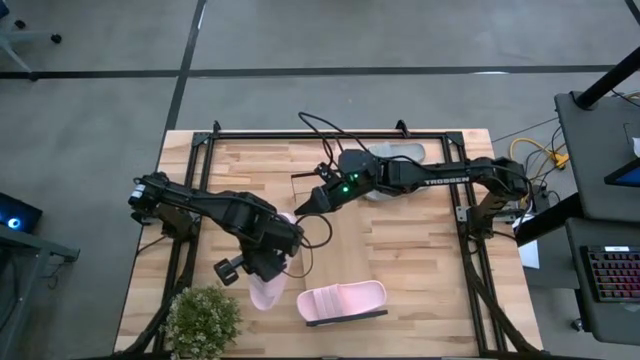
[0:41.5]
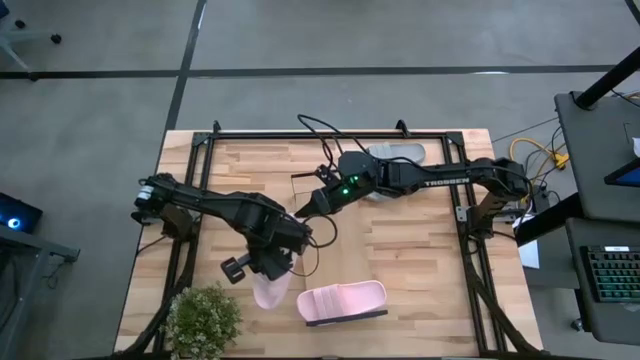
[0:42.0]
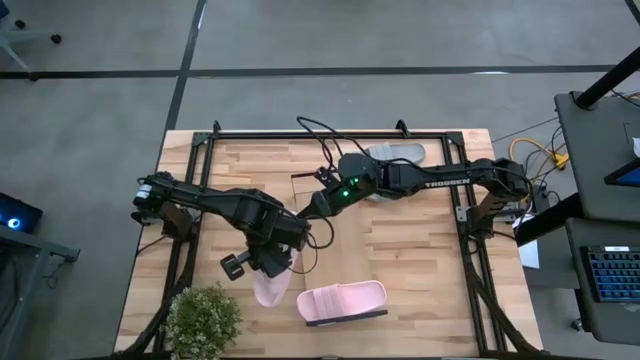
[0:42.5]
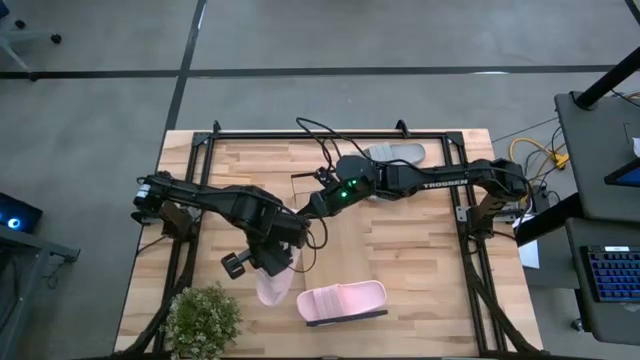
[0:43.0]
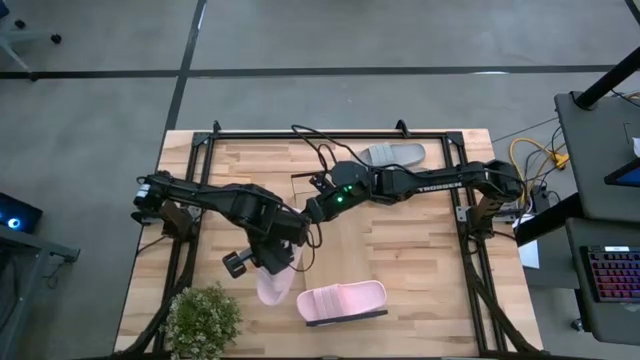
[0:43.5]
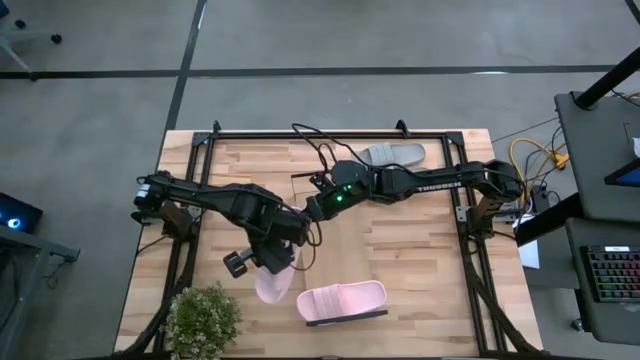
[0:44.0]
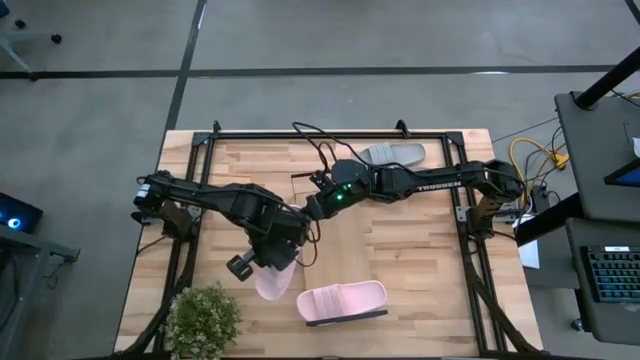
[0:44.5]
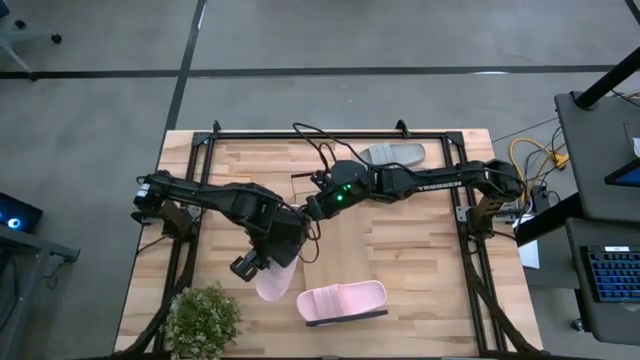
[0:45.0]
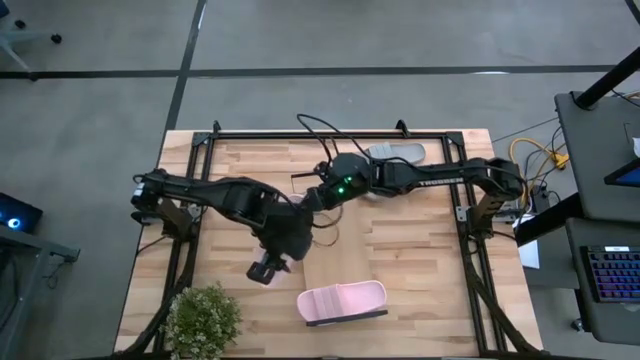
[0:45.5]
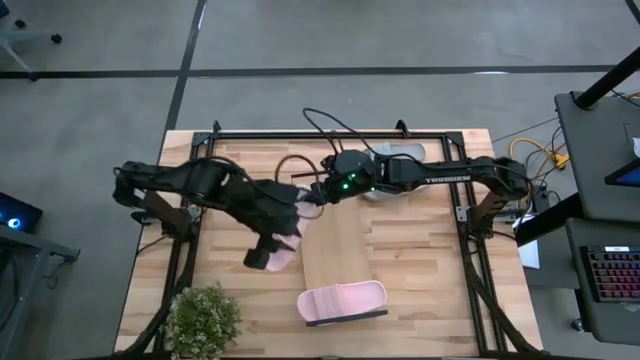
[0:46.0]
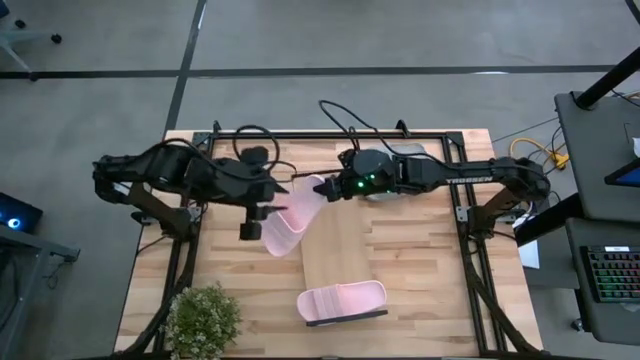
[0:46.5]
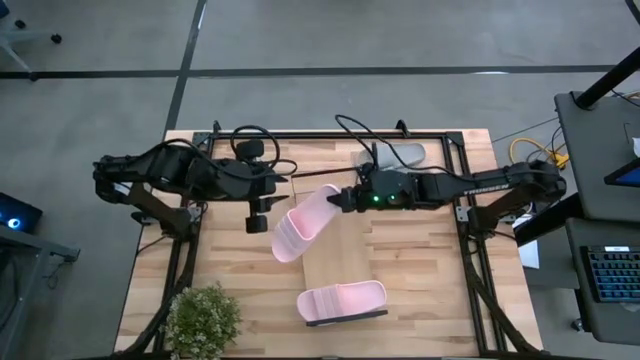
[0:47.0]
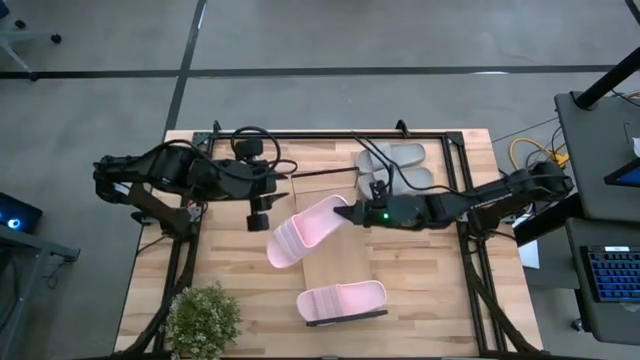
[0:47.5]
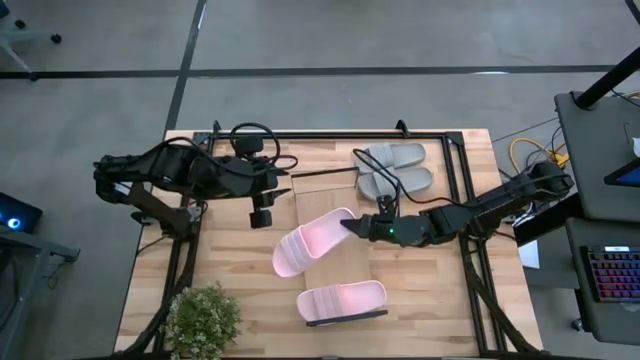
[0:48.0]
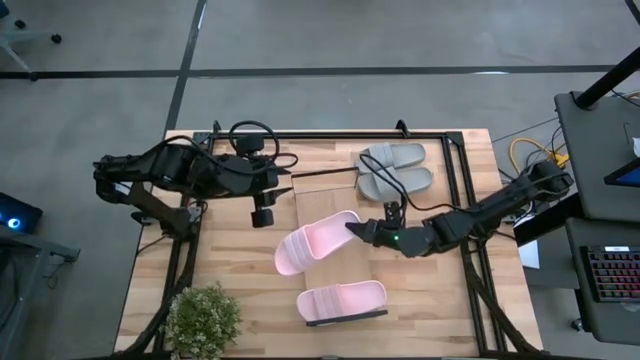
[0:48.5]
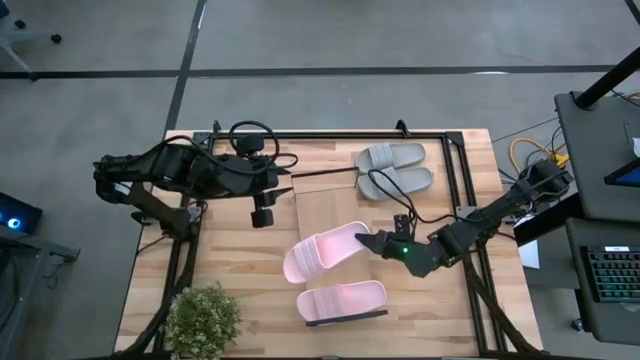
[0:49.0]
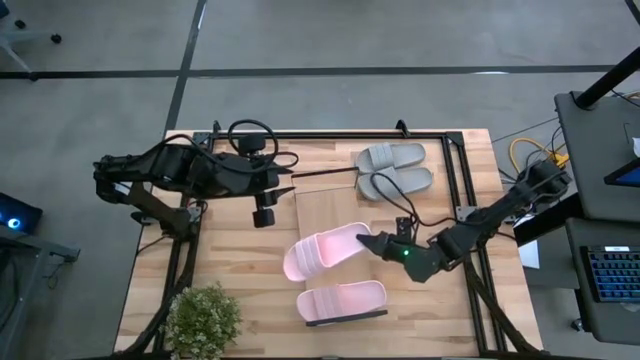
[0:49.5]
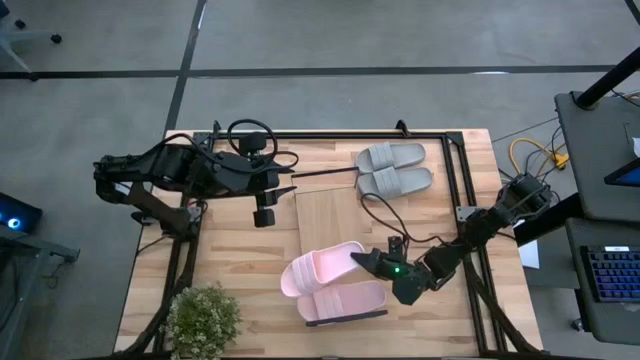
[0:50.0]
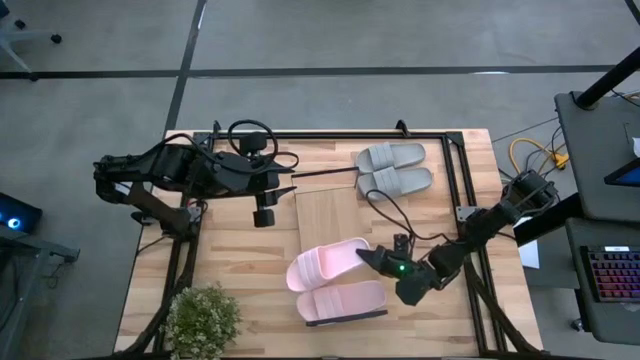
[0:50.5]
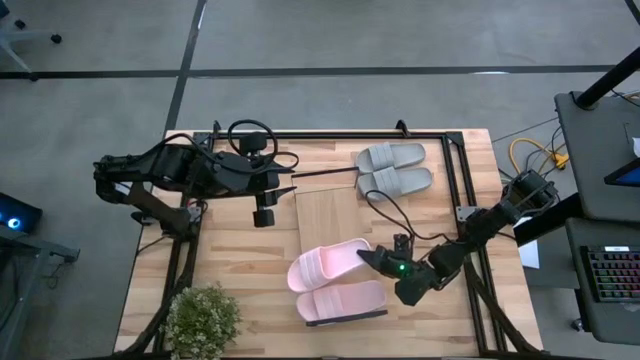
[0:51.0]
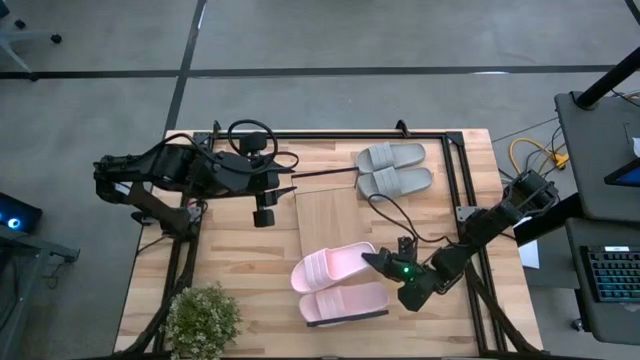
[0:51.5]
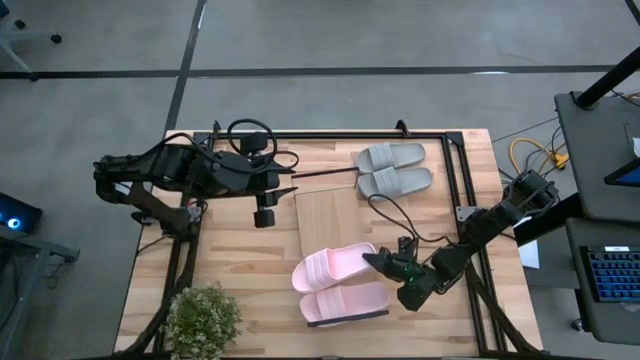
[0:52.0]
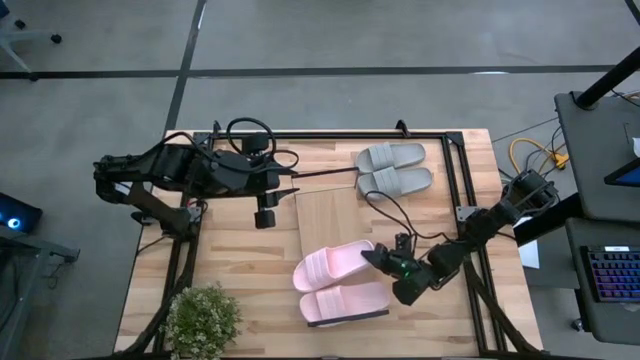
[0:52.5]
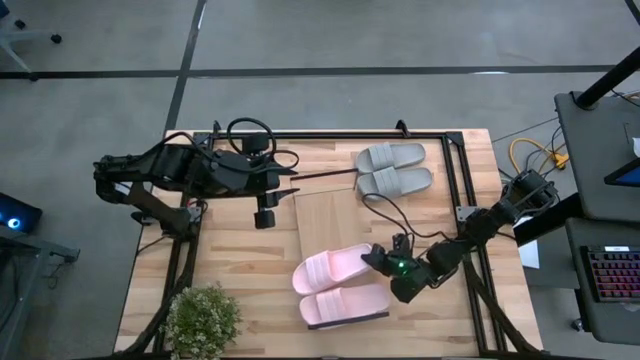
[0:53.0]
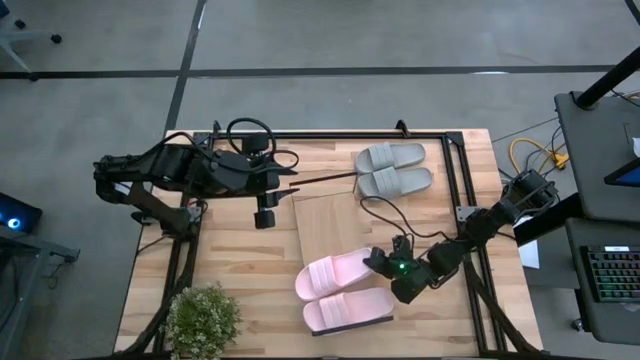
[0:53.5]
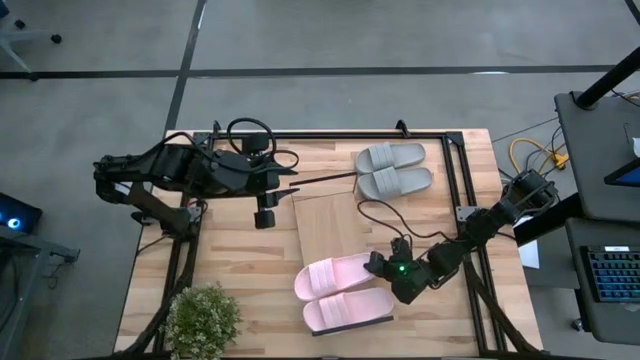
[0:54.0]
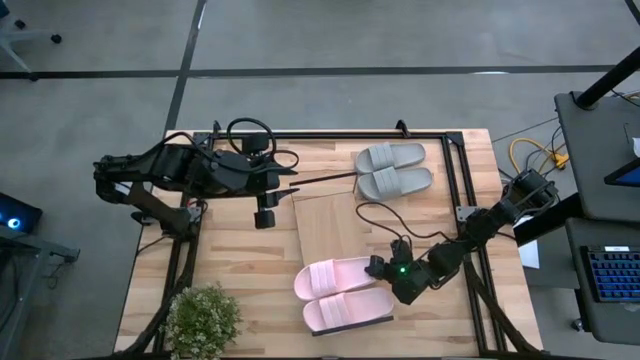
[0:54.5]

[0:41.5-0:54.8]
Task: Pick and place slides into the shelf
Put the pink slide on the shelf

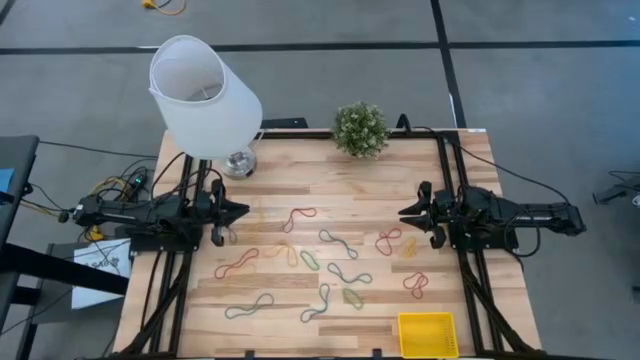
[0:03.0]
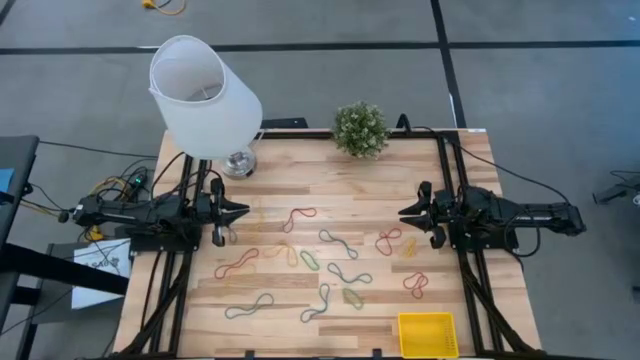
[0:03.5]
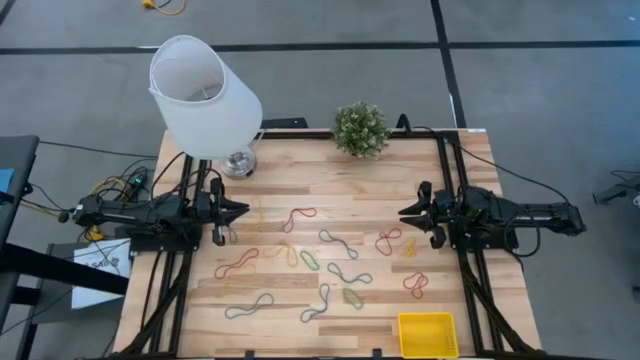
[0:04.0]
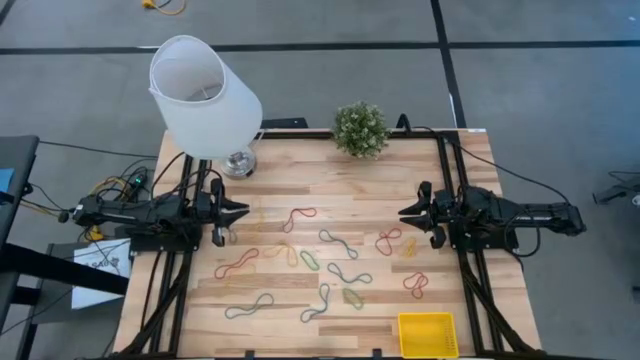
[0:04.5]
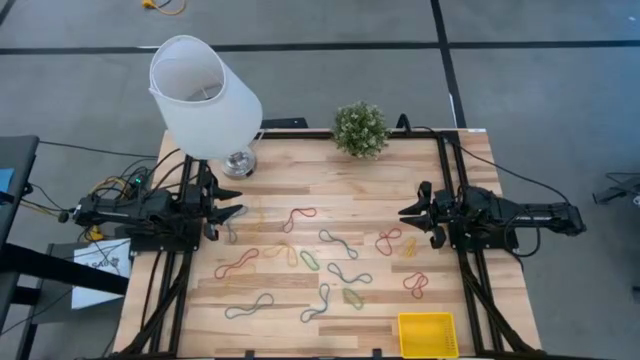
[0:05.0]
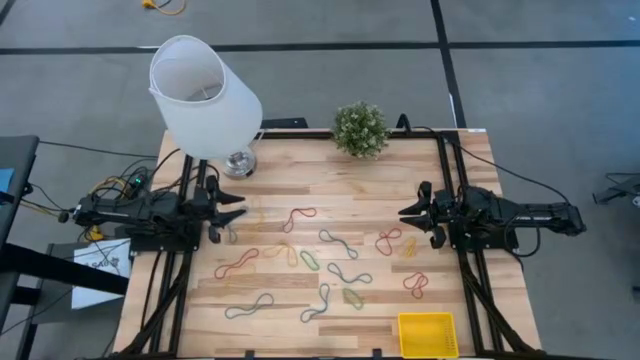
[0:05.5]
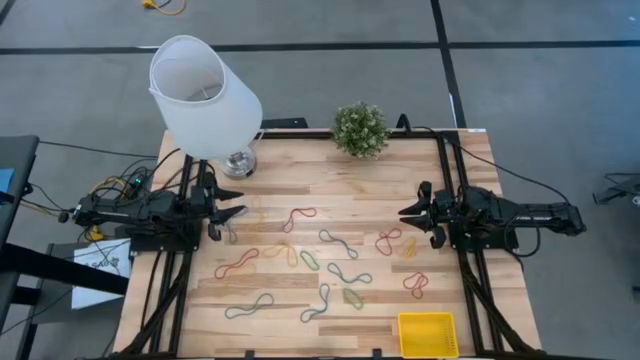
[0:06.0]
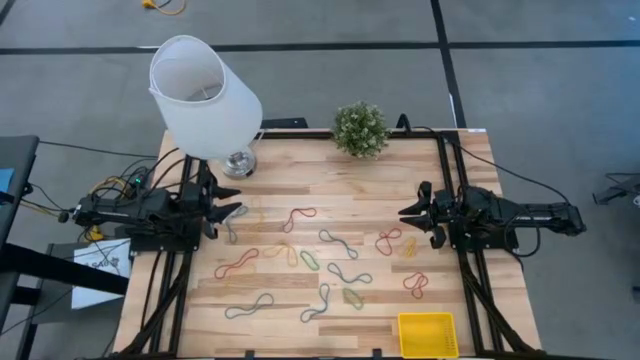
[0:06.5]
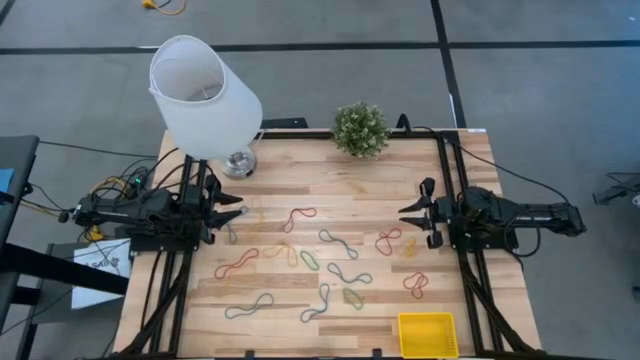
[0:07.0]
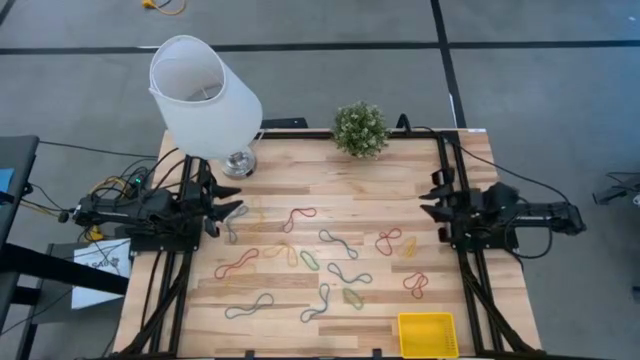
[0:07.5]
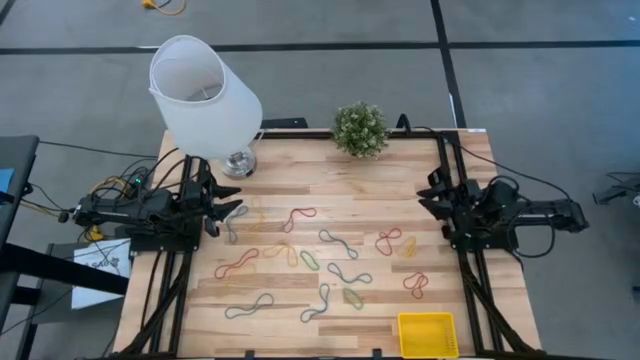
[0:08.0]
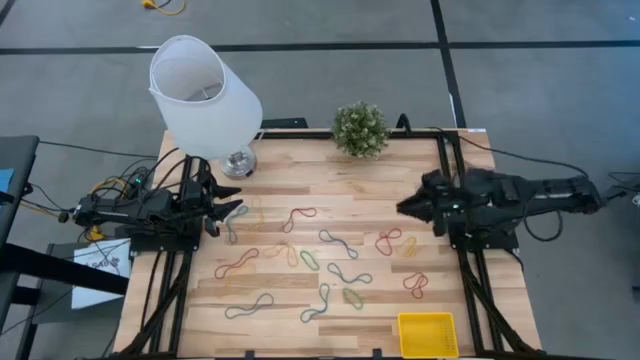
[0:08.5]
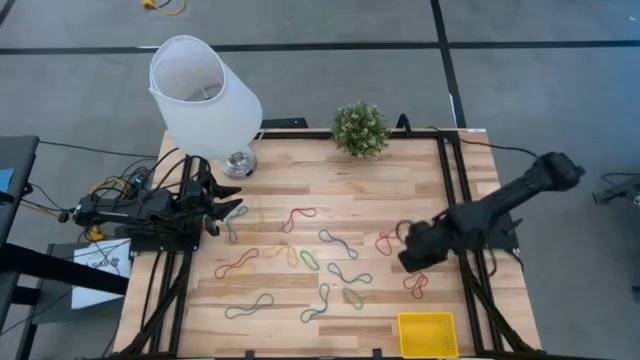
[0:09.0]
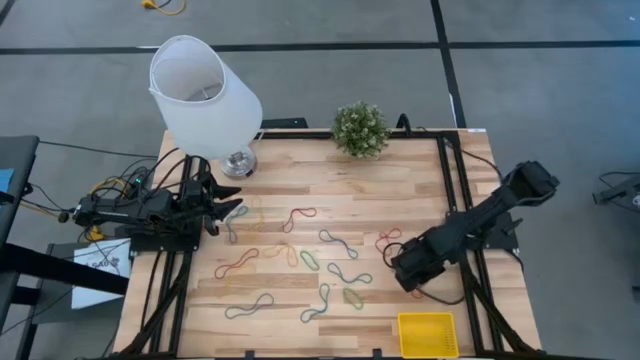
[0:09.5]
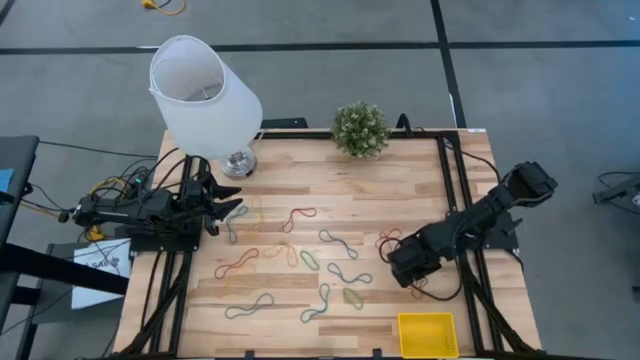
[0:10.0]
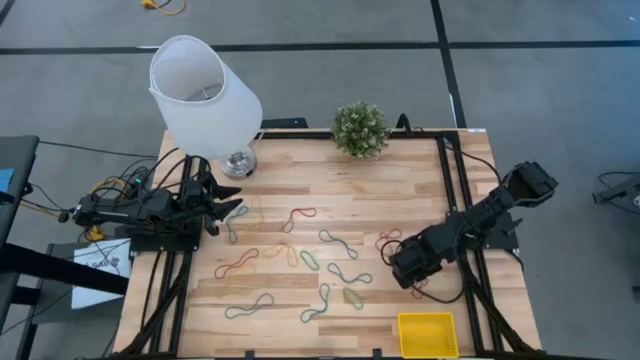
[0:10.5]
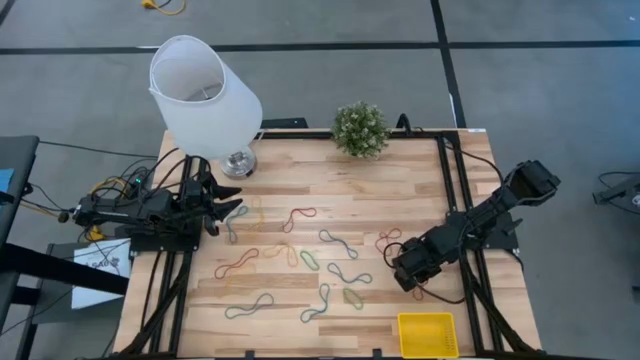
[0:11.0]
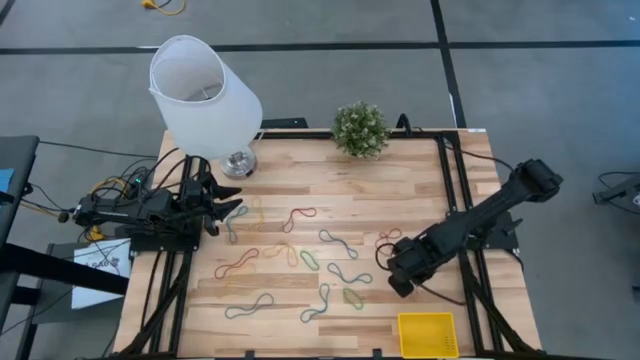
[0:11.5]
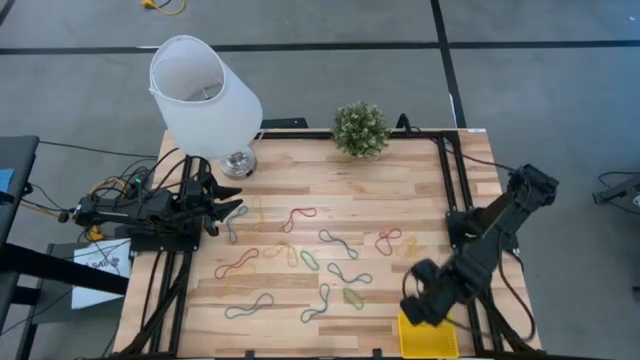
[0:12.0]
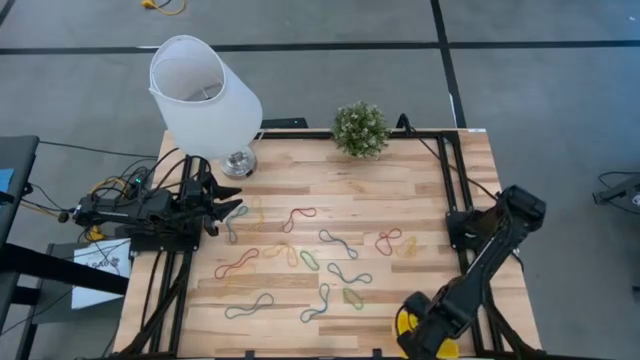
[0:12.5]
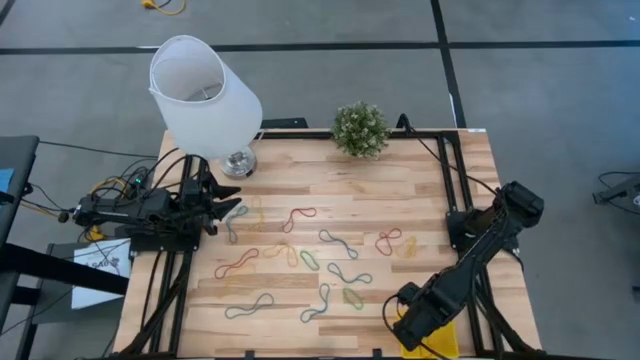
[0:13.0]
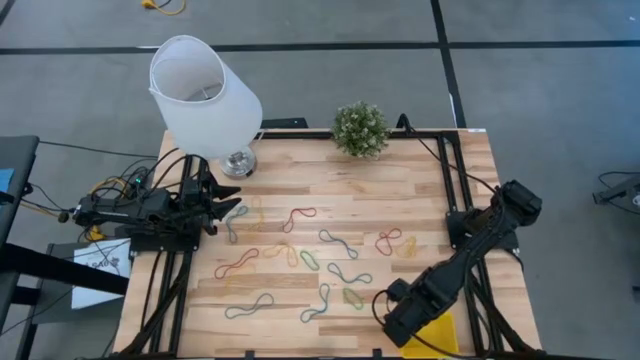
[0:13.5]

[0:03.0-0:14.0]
Task: Pick and place rubber bands into bin
Put the red rubber band into the yellow basket
